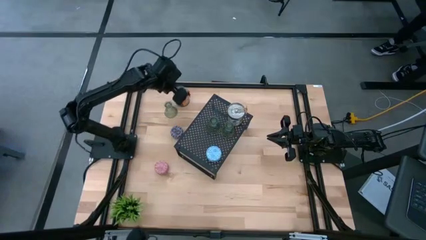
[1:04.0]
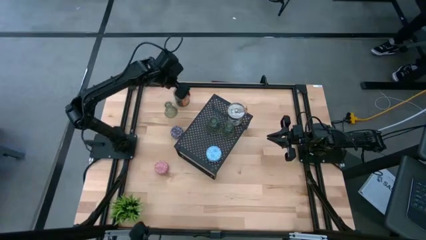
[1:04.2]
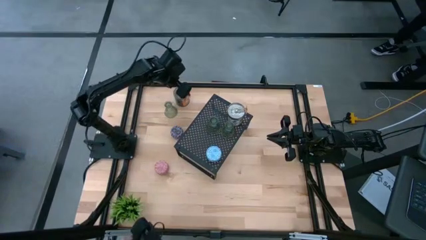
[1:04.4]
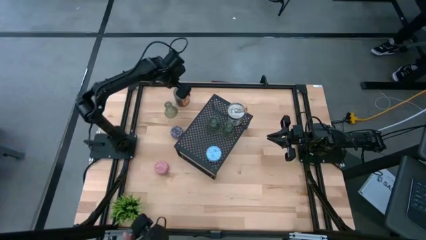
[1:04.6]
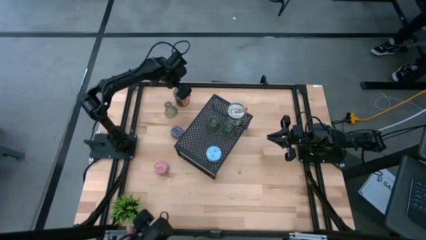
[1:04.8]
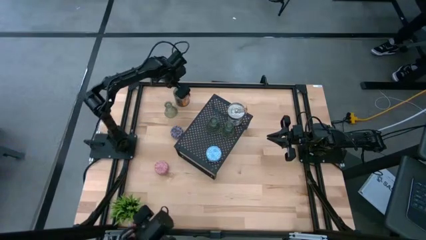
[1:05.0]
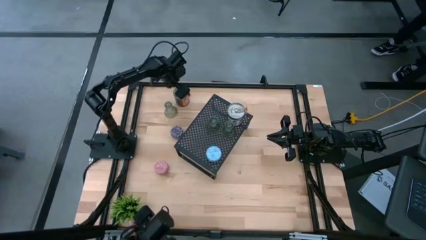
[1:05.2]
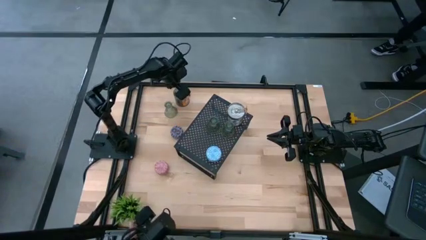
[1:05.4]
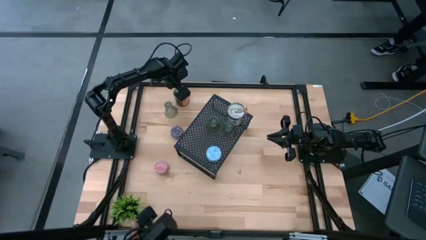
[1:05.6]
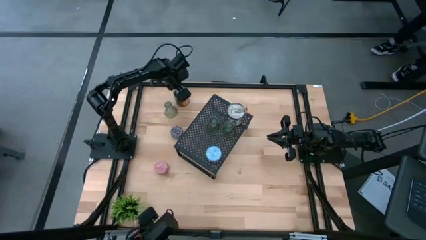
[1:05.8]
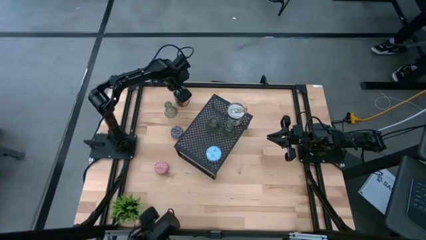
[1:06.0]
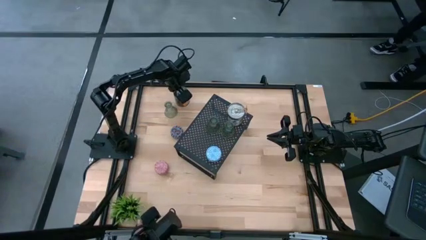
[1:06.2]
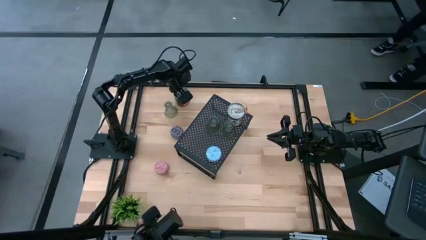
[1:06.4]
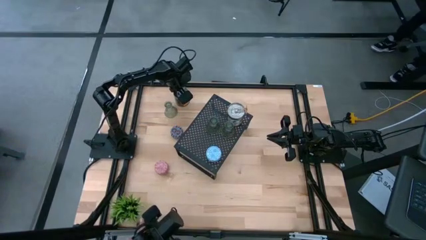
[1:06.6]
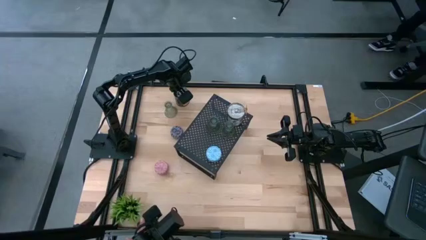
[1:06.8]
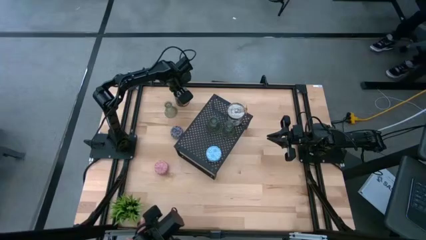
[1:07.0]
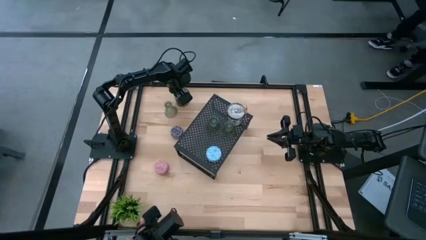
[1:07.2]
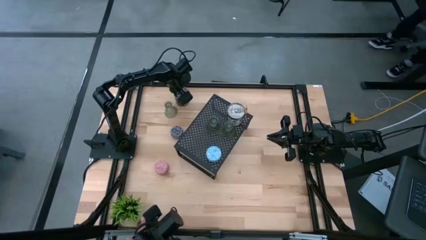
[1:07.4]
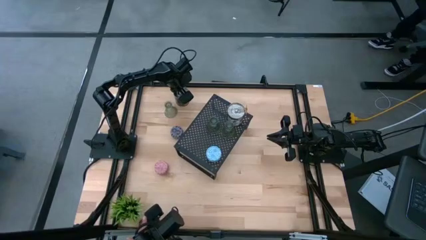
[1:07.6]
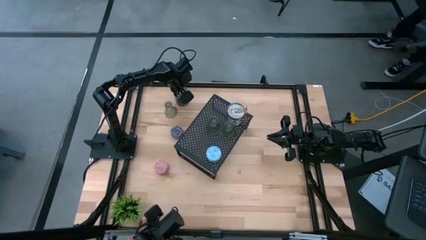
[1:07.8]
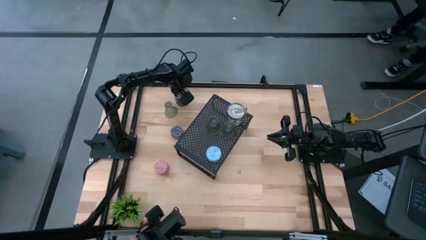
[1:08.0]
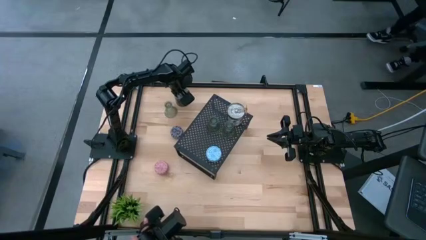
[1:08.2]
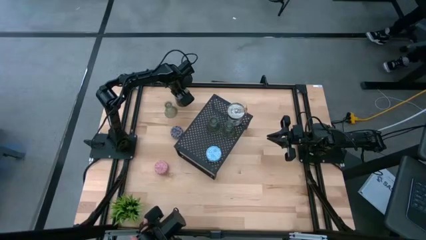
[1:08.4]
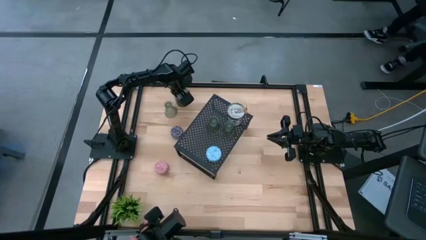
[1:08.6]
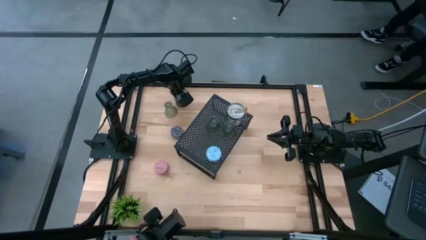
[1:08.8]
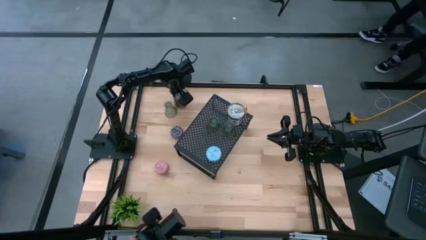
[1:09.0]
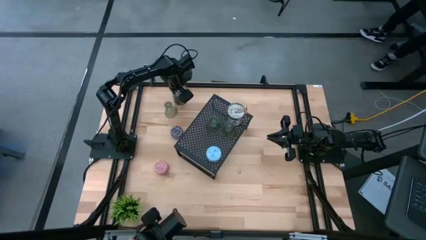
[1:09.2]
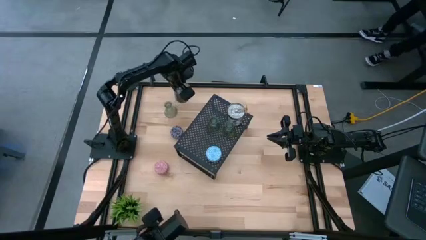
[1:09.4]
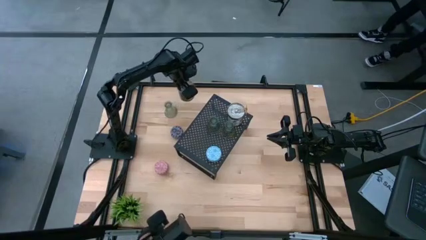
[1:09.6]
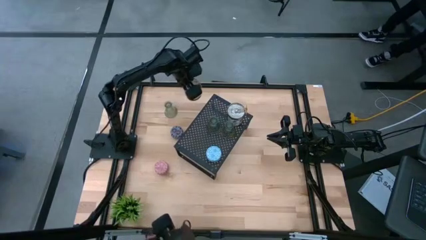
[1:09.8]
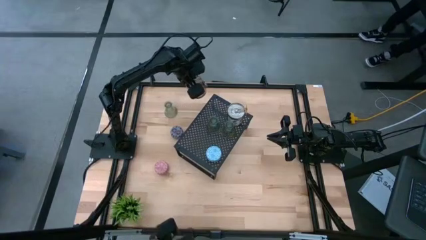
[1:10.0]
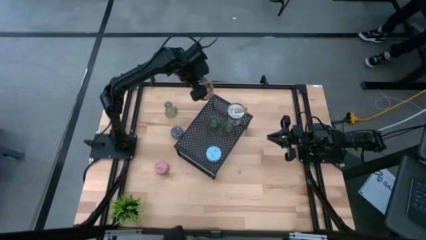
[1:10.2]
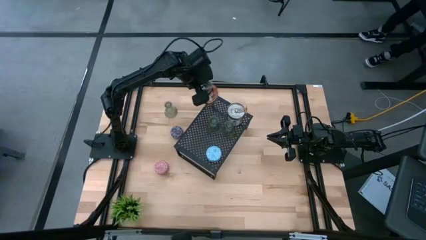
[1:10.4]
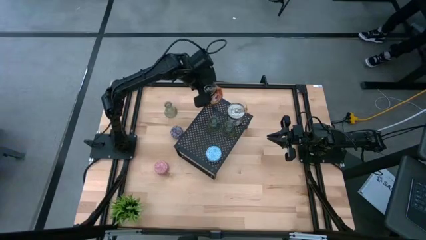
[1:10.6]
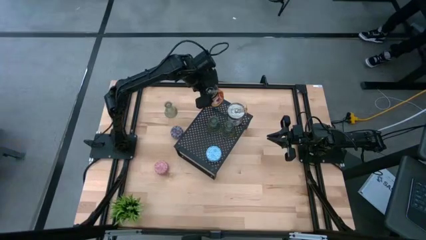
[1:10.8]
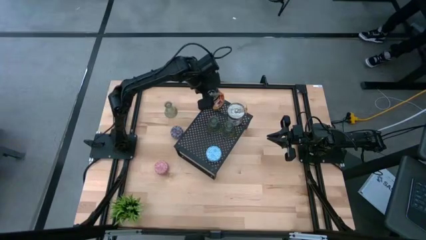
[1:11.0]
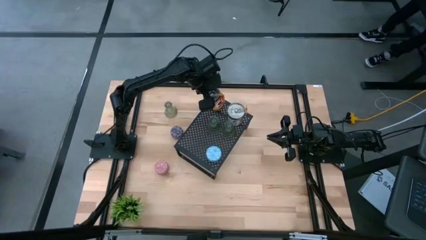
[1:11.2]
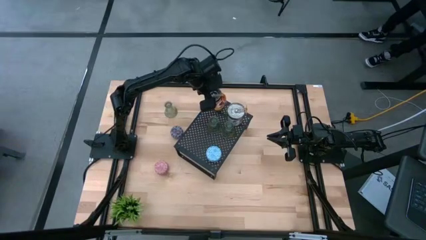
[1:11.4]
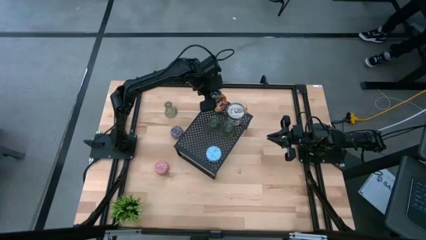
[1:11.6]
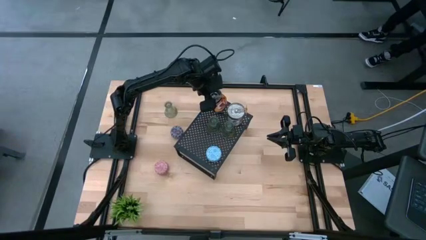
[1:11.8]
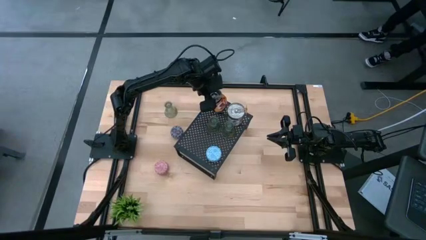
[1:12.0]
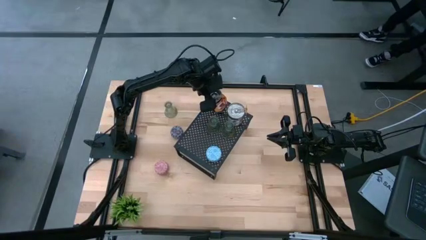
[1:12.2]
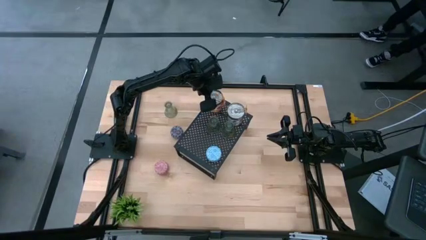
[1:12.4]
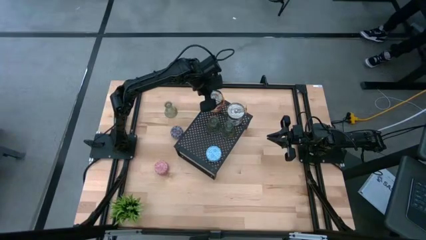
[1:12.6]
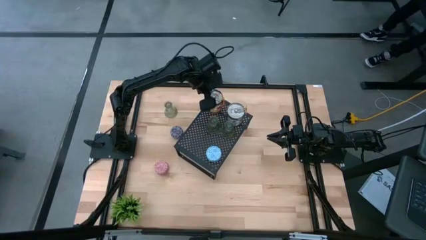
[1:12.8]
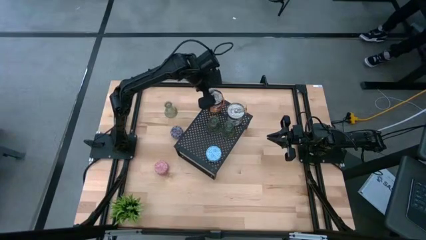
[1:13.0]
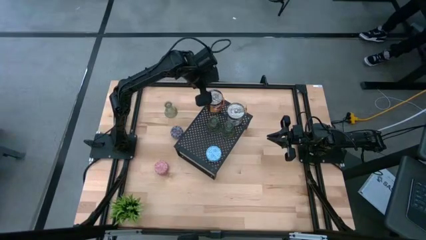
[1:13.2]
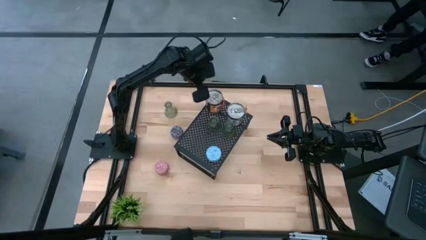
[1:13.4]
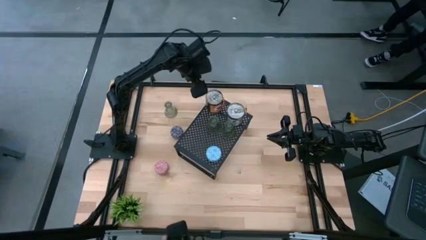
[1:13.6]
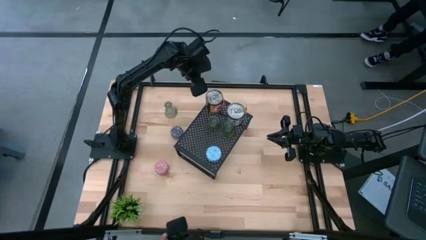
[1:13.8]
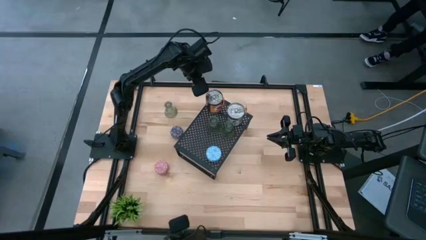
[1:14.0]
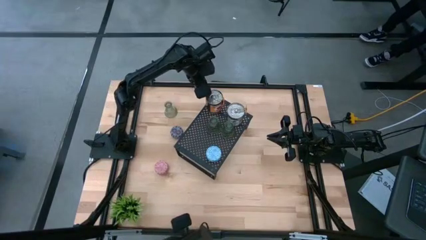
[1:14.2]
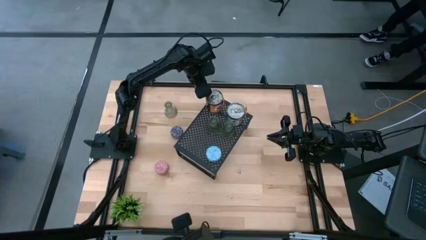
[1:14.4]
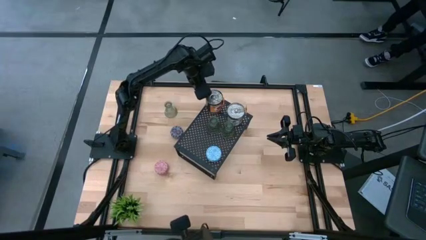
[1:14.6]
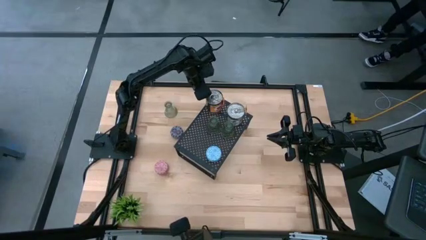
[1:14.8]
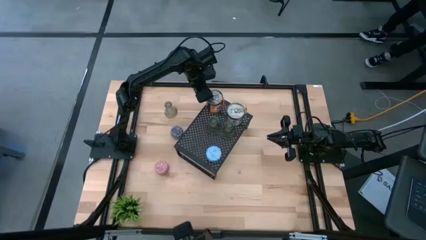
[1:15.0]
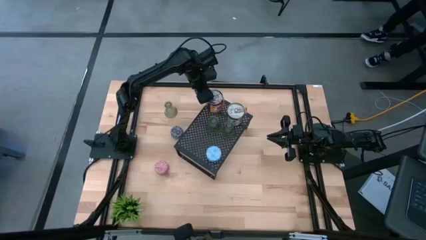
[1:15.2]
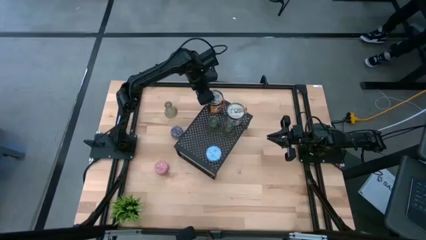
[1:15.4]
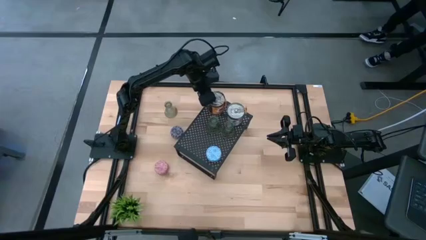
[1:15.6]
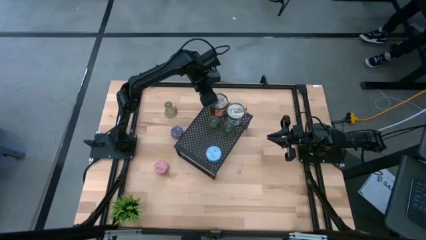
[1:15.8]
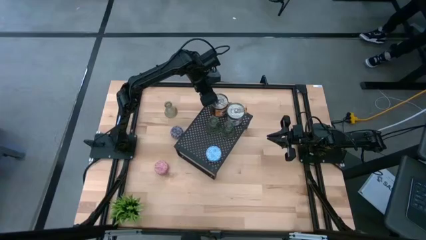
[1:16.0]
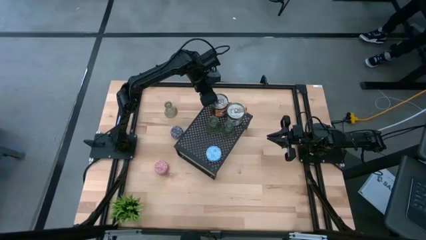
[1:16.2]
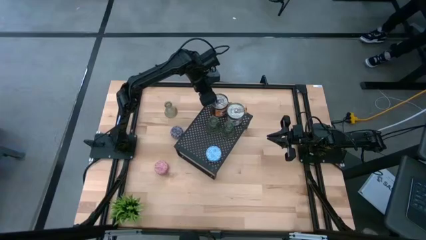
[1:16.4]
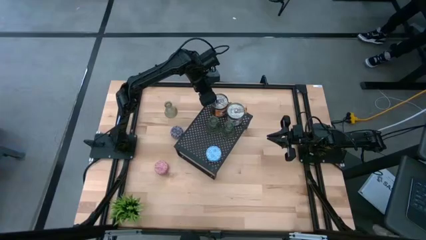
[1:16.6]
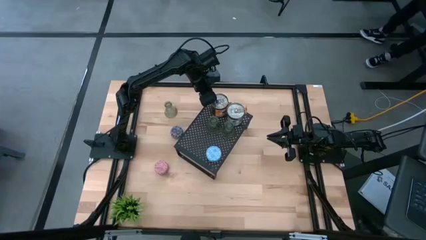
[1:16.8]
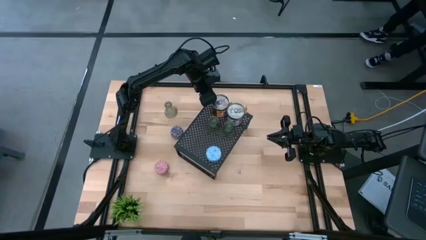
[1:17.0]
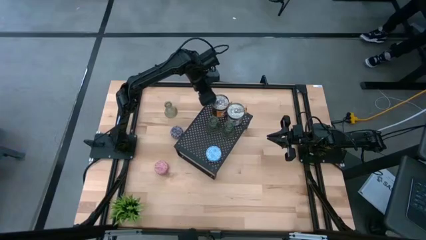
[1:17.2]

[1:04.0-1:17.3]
Task: Pick & Place candle stick holders
Put the scented candle on the shelf

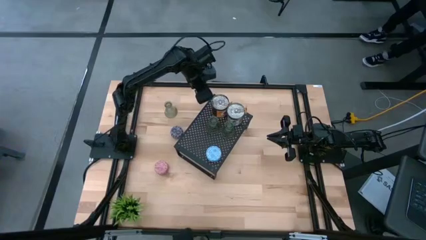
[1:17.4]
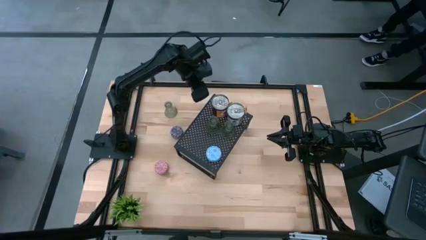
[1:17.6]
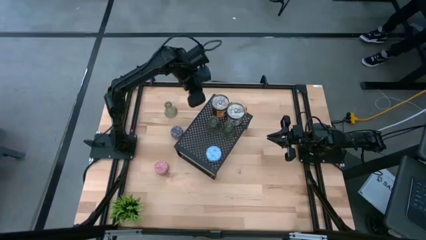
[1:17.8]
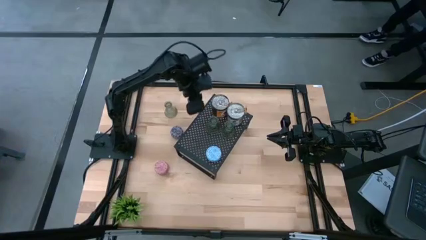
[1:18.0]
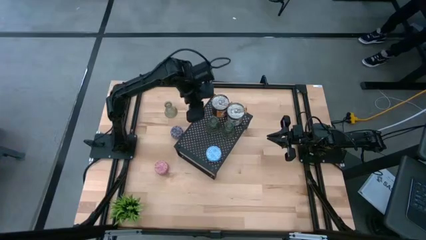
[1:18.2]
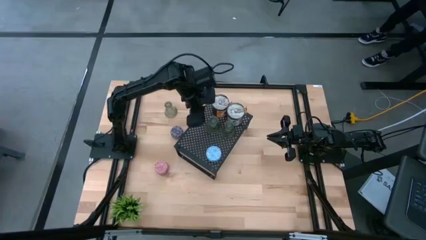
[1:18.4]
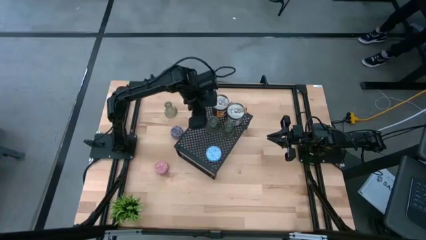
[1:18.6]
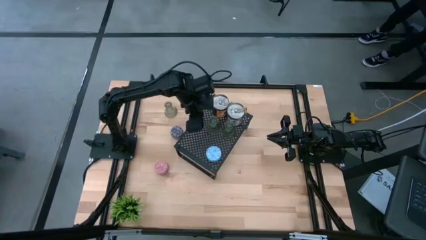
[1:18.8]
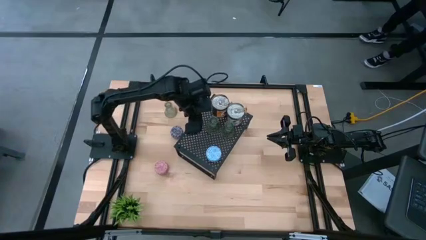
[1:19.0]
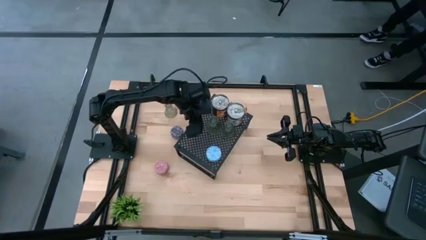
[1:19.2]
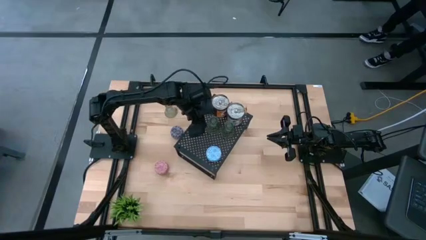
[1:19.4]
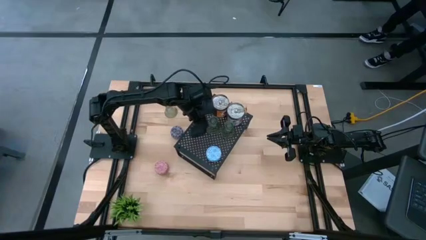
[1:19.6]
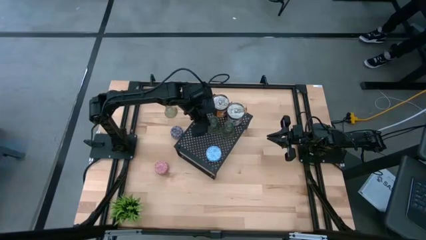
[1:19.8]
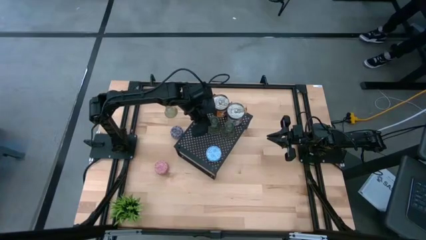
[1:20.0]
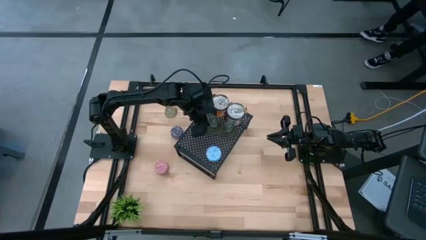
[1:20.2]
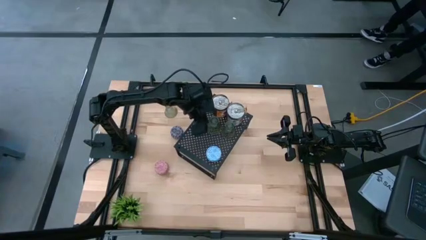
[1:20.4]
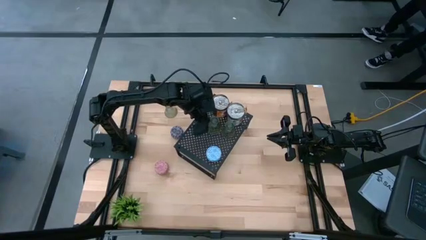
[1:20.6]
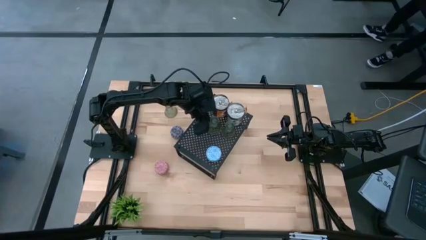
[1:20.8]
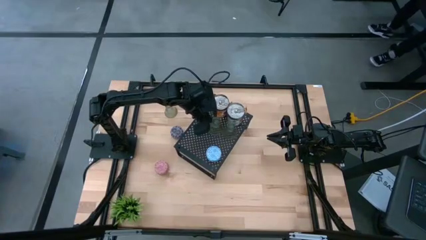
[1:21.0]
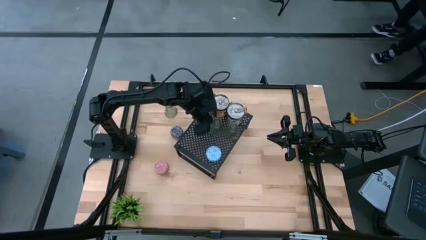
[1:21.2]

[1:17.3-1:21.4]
Adjust the glass candle holder on the shelf
